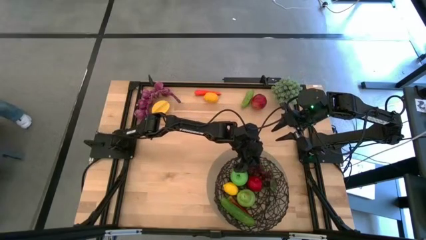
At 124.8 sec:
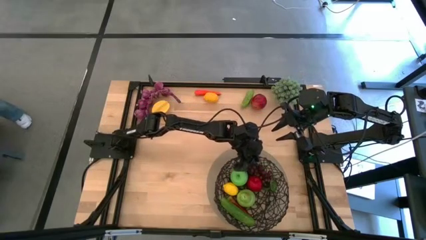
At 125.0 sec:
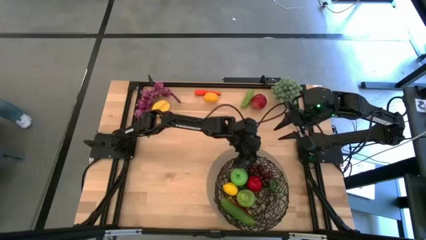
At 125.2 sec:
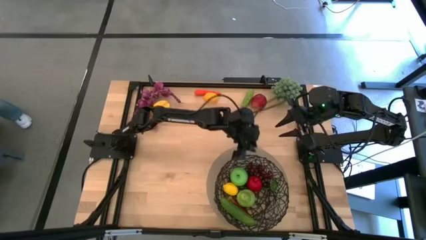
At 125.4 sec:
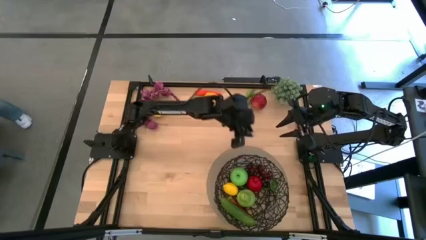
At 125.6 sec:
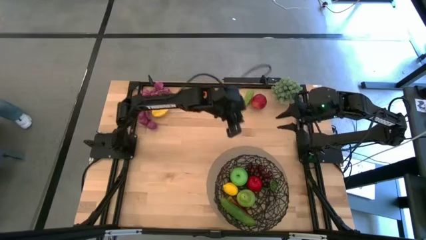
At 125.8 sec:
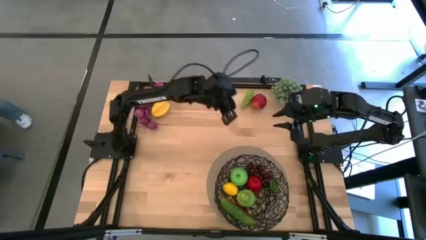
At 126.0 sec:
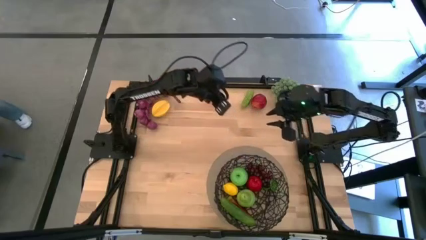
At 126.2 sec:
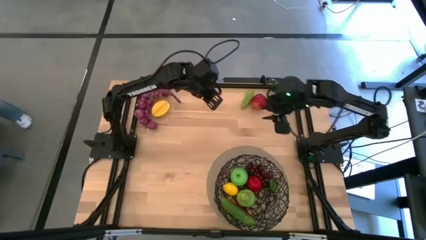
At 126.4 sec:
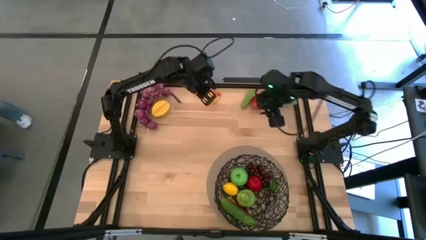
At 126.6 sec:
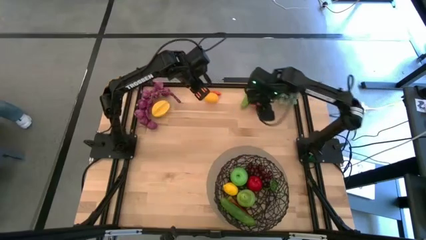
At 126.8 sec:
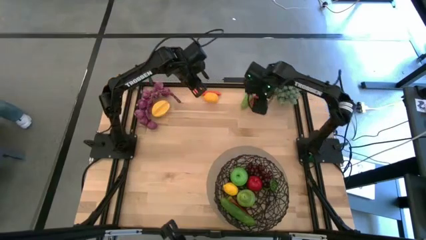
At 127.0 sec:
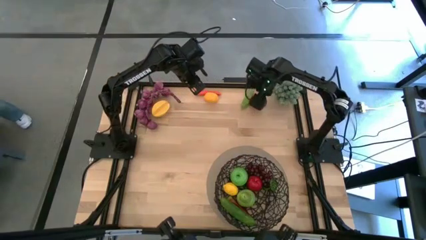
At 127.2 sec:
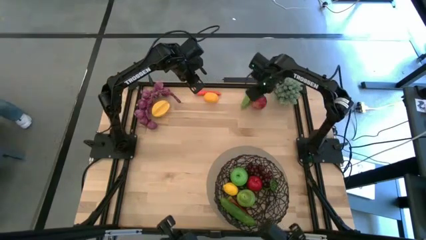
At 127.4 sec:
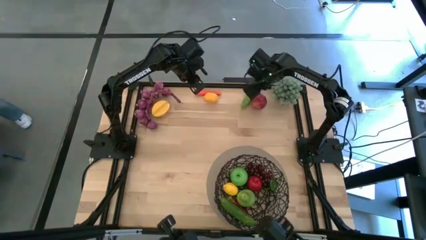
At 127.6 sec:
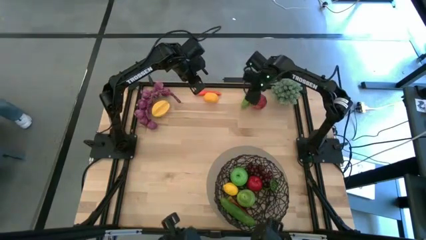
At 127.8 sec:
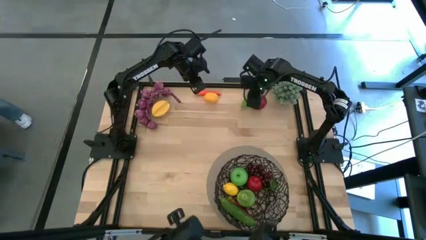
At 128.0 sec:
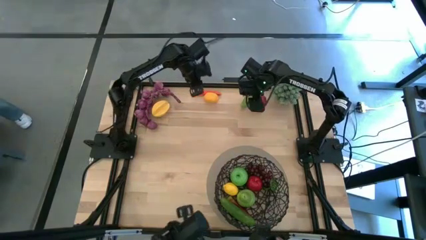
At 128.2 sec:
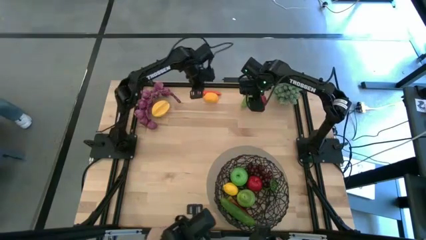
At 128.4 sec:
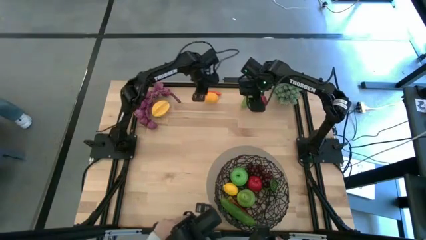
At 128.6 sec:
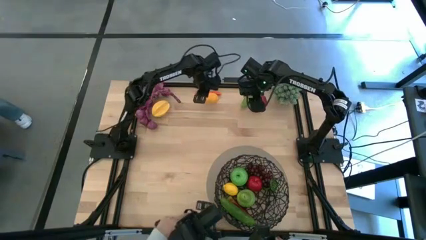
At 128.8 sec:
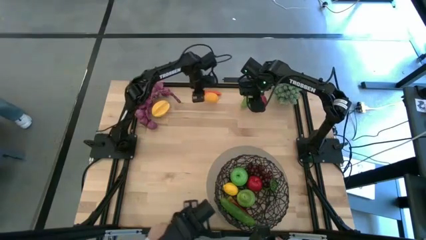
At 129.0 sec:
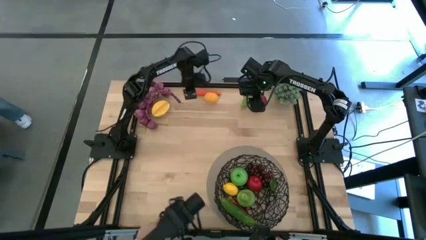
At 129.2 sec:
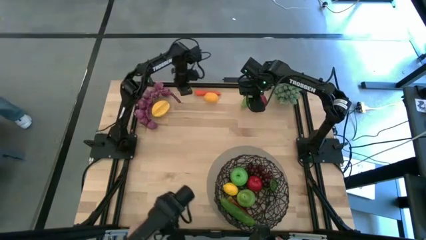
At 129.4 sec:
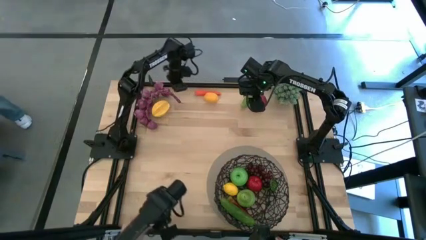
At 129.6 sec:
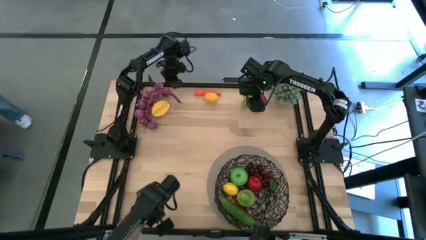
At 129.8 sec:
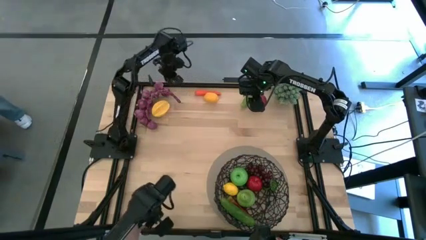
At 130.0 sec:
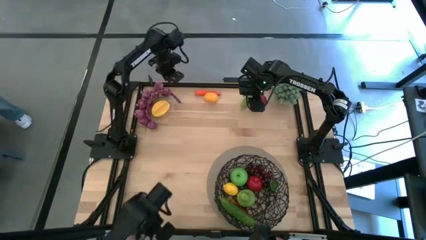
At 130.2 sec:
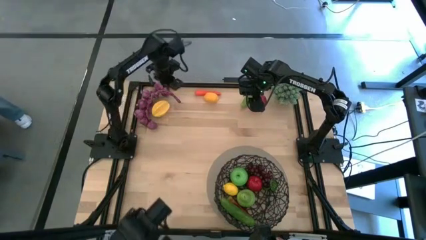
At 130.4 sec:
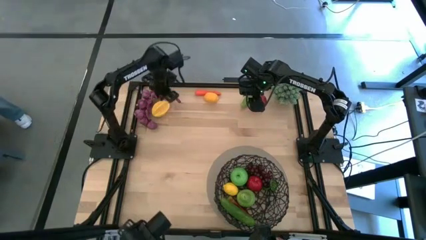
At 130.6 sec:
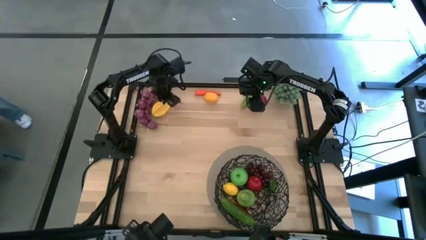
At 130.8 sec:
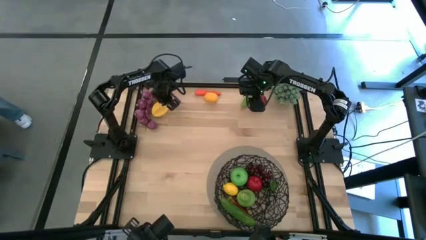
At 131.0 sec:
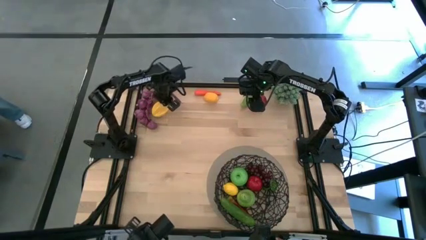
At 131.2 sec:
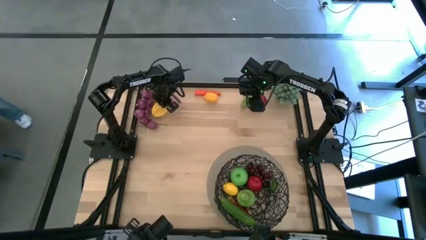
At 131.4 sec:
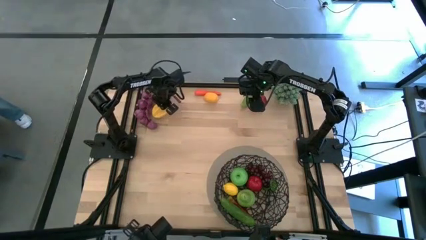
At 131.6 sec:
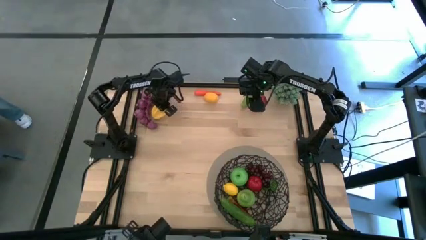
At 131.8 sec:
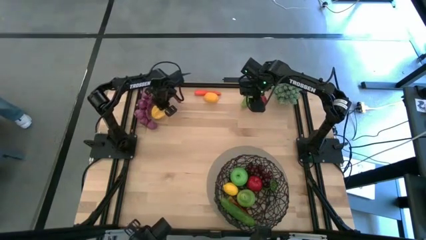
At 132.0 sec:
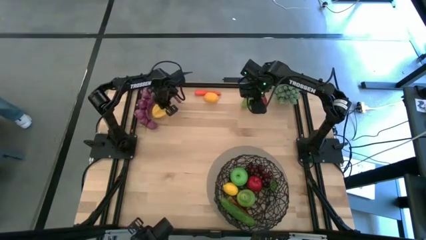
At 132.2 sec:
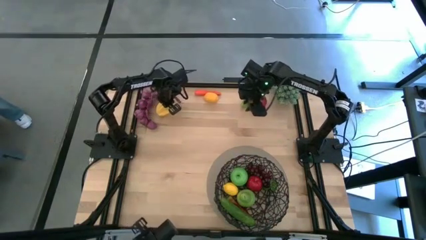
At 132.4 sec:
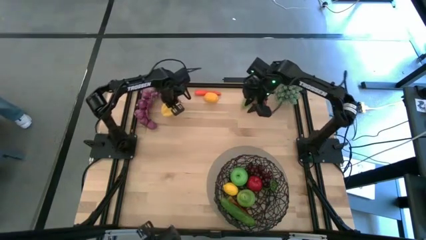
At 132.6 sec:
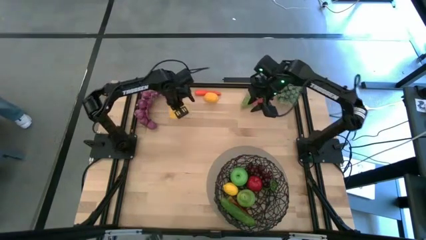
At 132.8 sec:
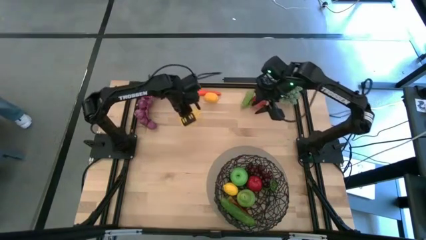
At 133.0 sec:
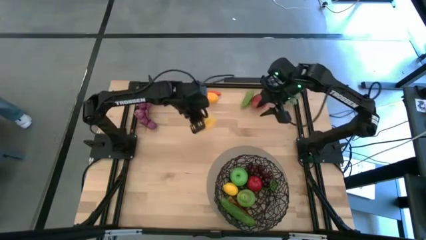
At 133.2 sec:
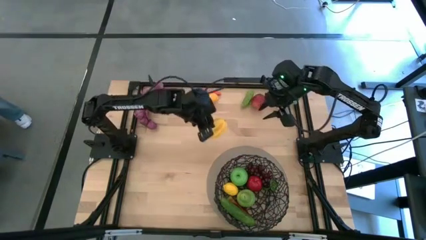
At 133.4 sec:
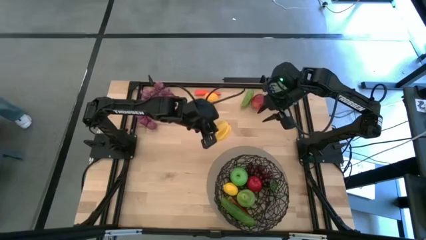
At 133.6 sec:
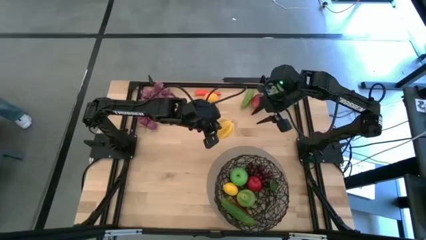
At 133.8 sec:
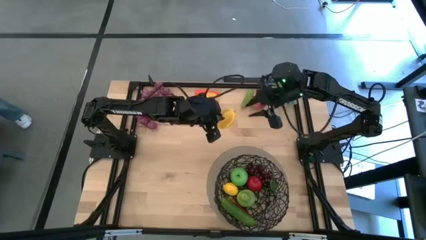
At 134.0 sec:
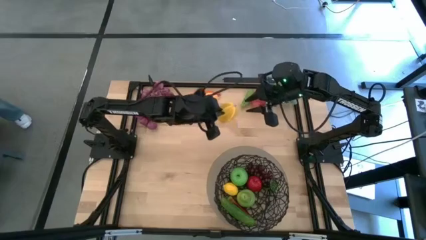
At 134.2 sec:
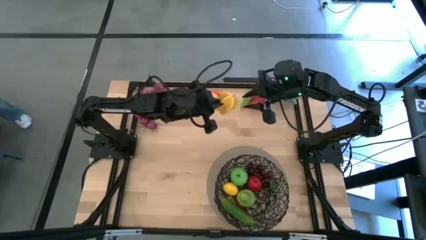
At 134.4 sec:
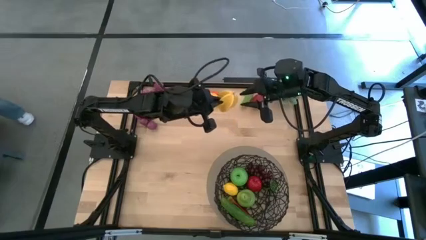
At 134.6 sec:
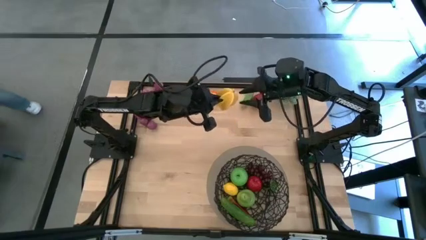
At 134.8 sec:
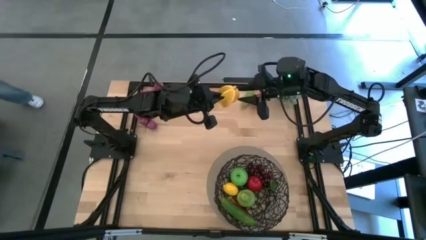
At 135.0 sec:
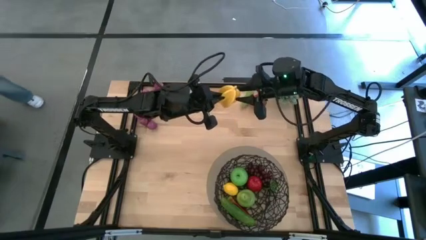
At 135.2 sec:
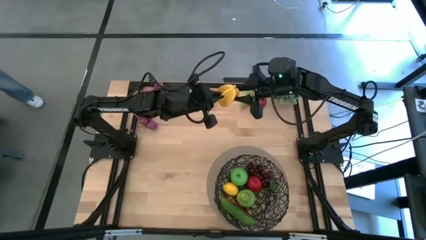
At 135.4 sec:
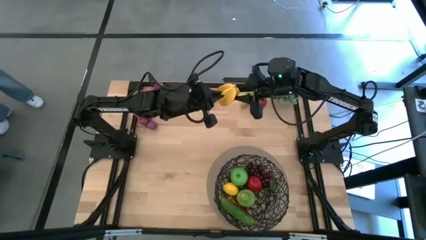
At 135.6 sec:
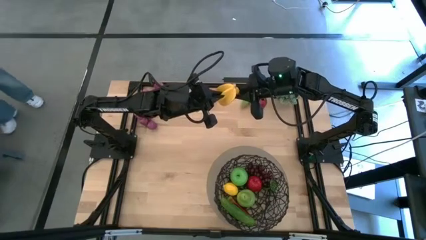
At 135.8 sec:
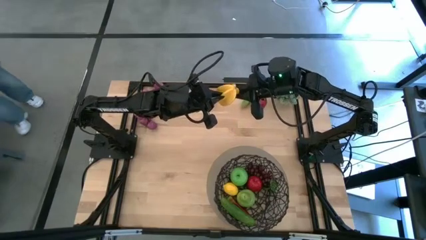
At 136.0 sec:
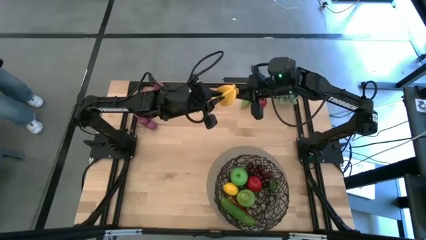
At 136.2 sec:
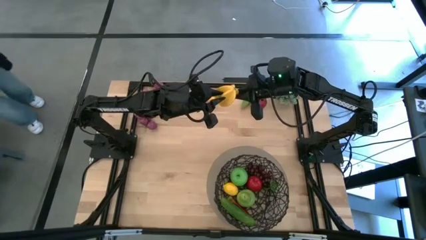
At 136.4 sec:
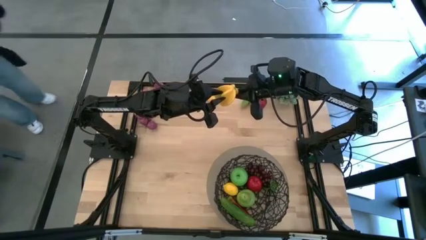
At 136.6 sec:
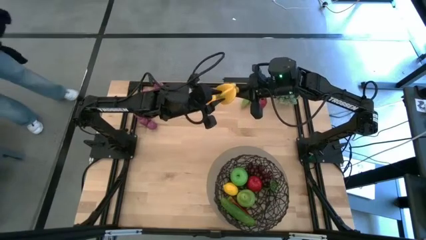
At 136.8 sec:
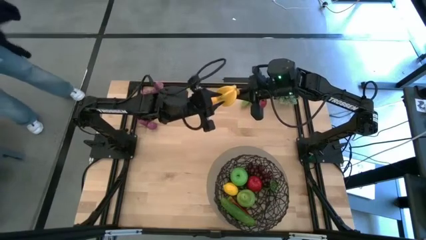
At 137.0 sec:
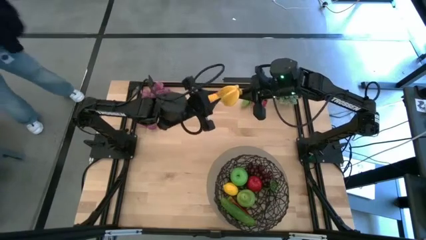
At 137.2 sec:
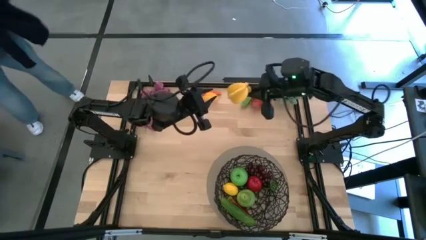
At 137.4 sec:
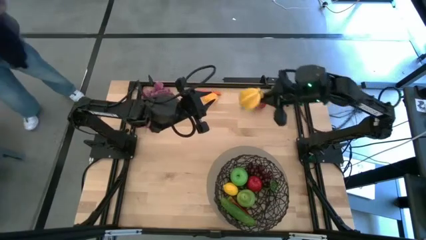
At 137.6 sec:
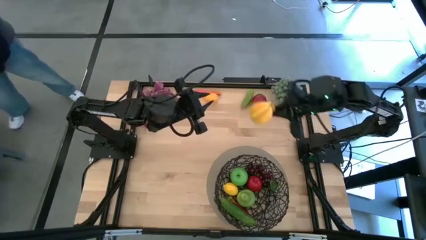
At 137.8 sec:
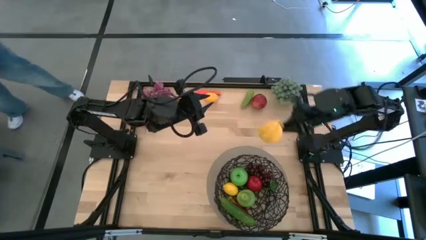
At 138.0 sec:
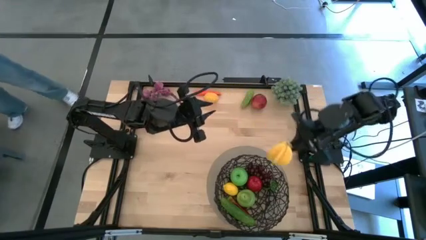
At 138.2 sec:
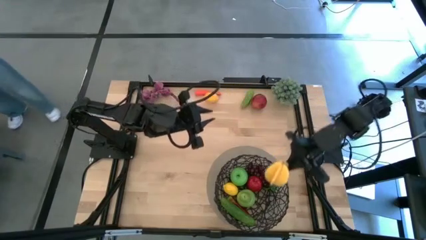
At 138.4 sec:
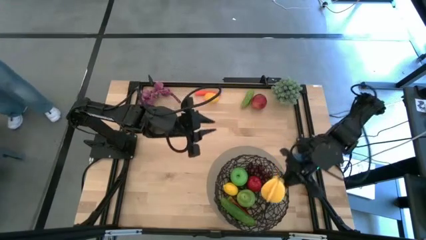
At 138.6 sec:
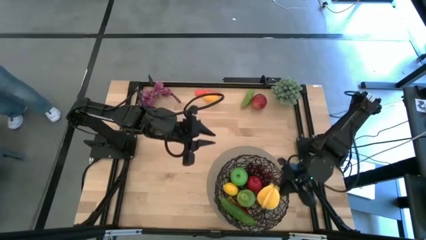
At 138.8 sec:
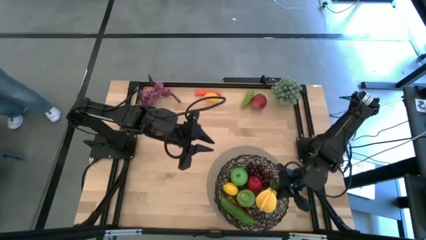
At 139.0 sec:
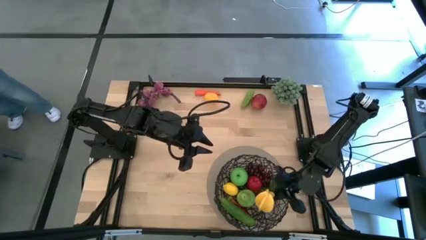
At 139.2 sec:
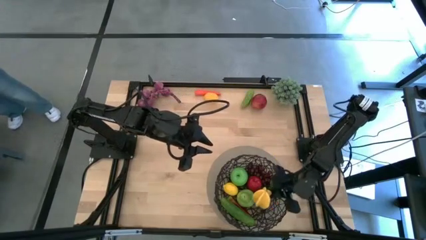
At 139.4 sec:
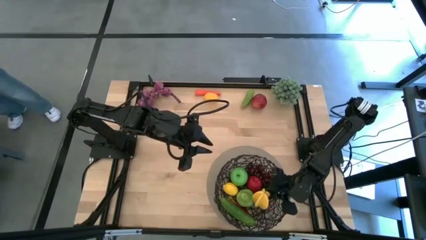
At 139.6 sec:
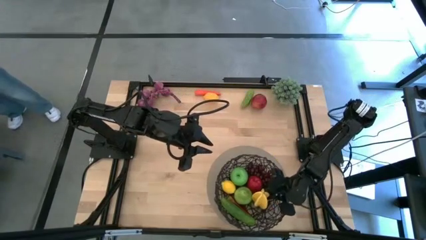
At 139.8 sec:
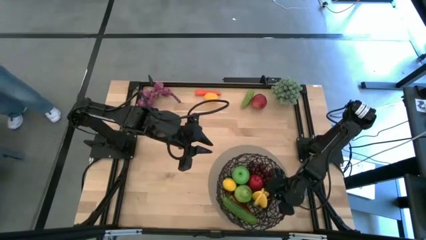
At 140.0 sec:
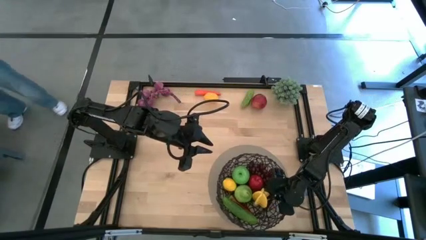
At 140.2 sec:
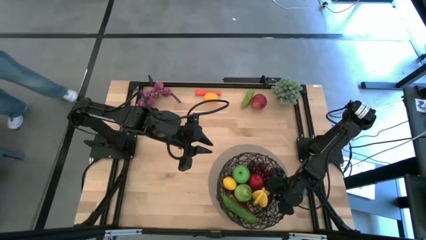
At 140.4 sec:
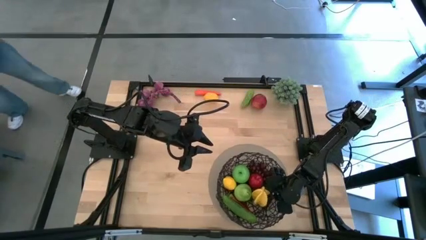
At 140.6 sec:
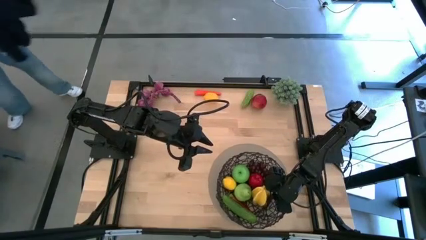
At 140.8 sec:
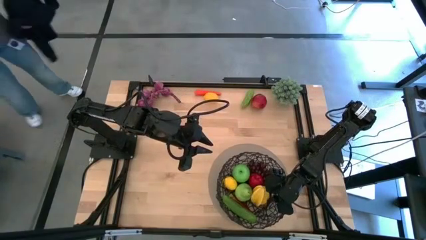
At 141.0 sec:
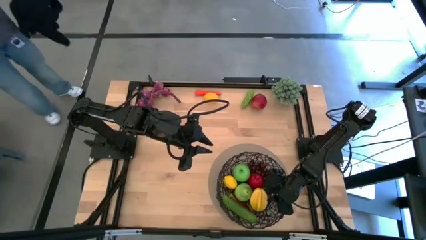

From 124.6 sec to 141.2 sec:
Task: Build produce basket
Put the yellow star fruit into the wire basket

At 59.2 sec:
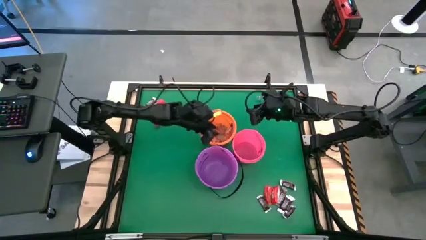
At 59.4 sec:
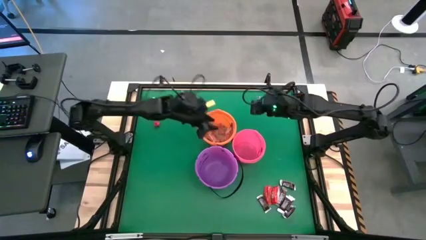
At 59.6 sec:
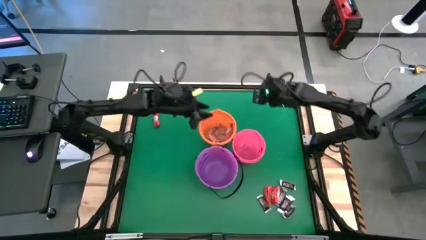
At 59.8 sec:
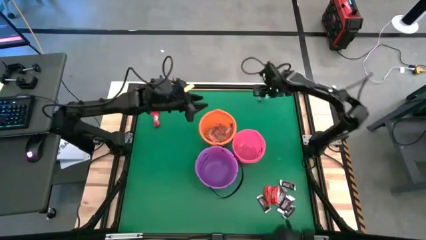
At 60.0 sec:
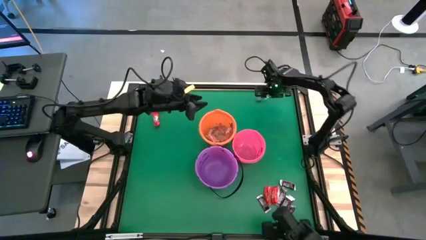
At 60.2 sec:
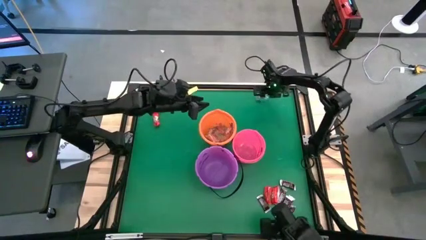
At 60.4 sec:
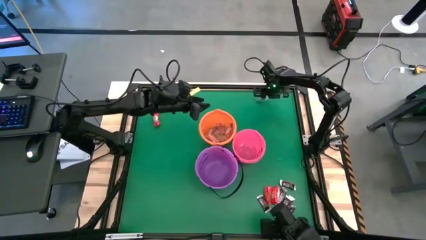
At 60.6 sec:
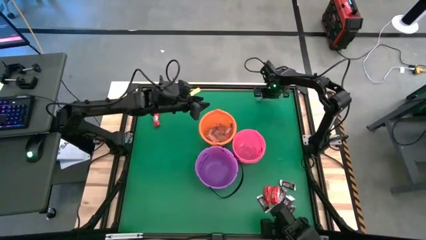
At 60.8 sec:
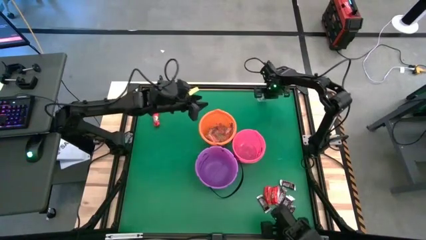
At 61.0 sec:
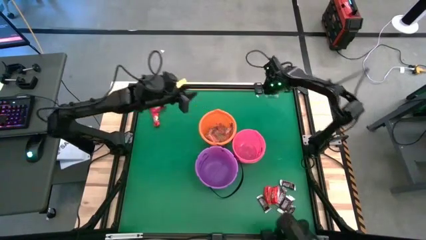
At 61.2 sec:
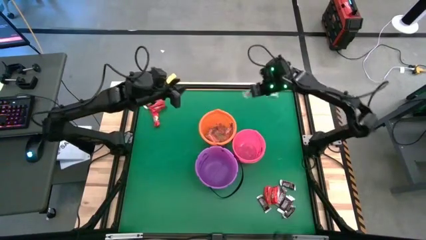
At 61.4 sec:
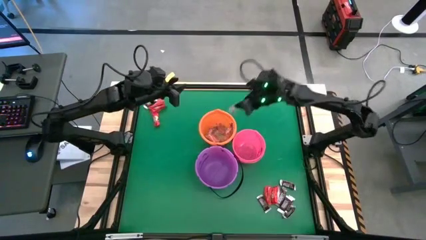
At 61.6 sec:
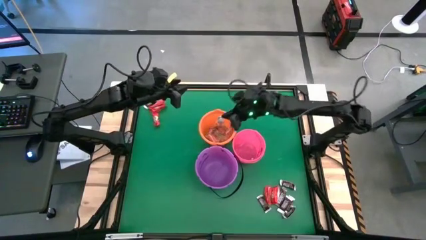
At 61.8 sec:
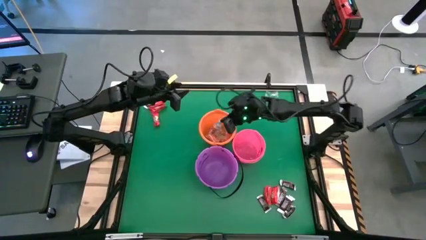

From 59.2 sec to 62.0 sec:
Task: Sort candy by brand, put in halloween buckets
Put the blue gummy into the orange bucket
